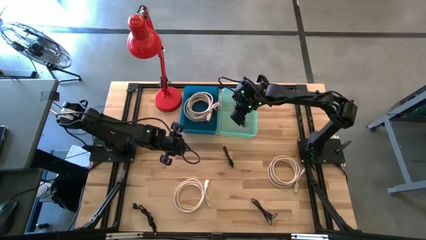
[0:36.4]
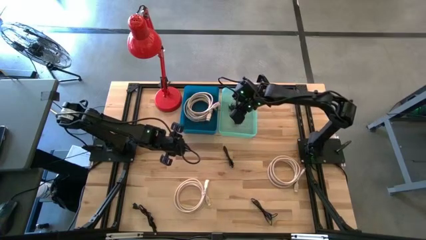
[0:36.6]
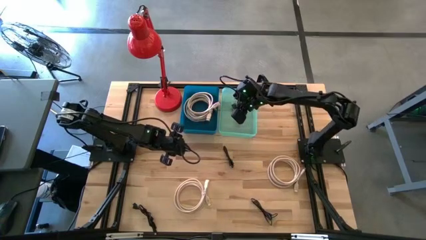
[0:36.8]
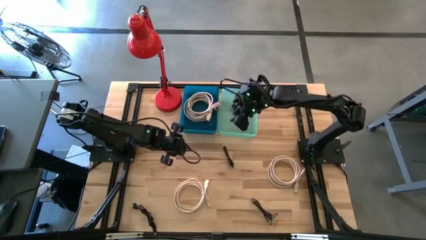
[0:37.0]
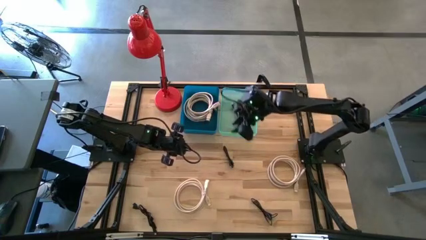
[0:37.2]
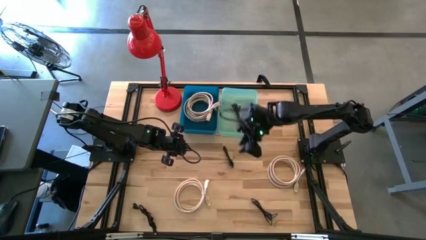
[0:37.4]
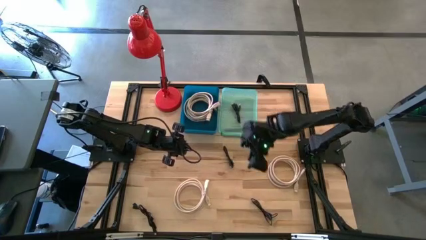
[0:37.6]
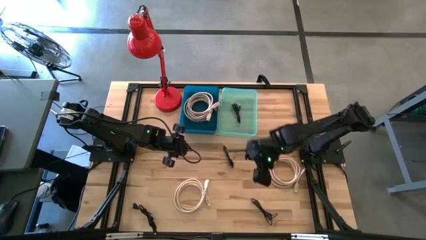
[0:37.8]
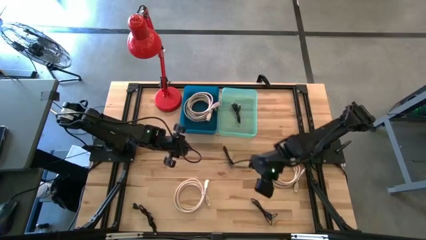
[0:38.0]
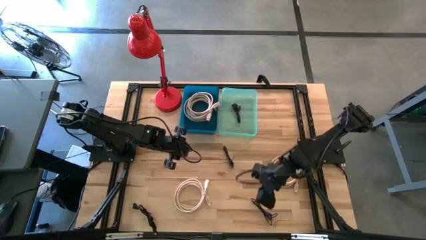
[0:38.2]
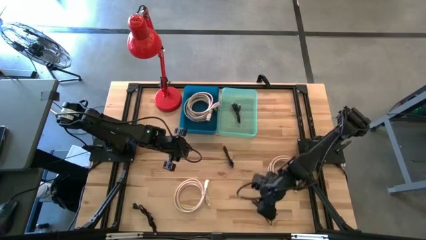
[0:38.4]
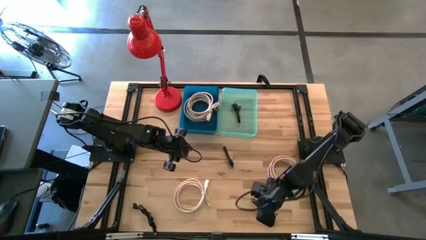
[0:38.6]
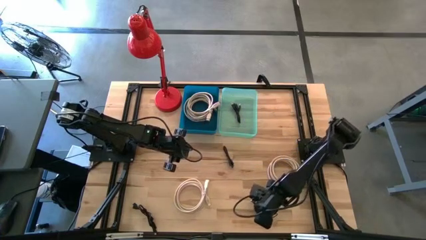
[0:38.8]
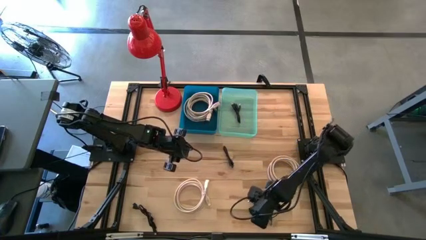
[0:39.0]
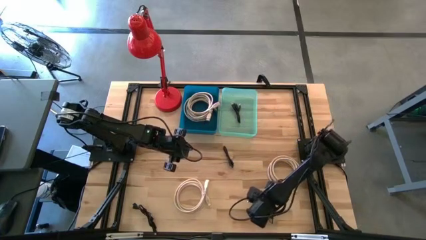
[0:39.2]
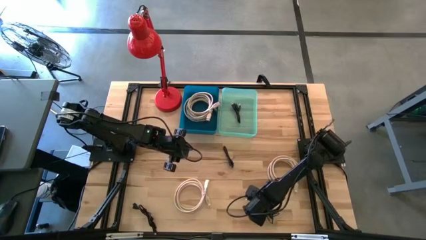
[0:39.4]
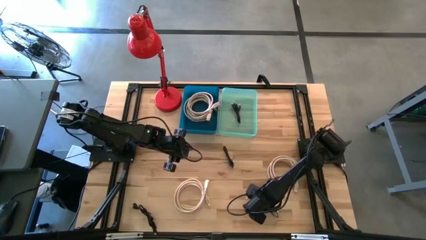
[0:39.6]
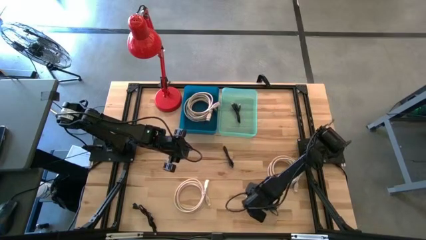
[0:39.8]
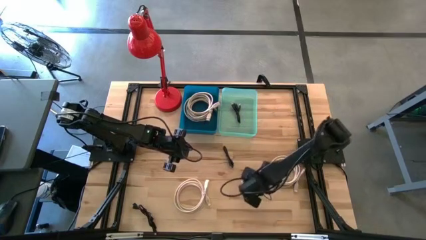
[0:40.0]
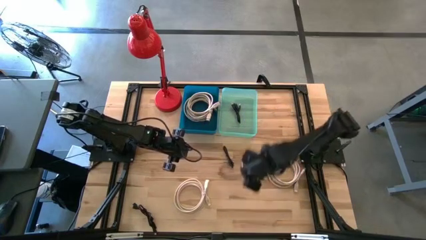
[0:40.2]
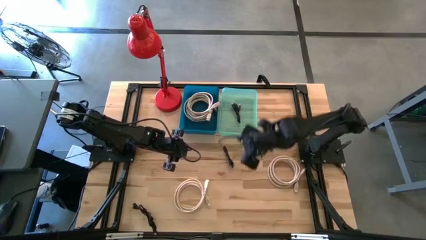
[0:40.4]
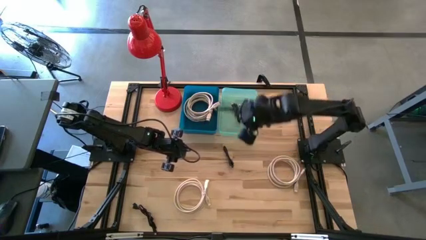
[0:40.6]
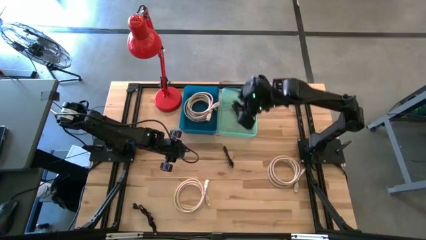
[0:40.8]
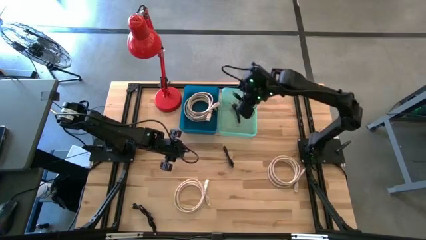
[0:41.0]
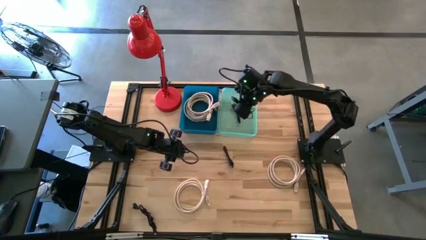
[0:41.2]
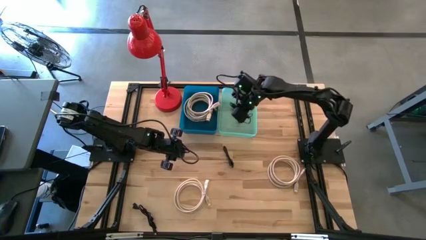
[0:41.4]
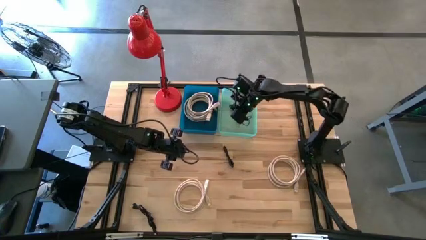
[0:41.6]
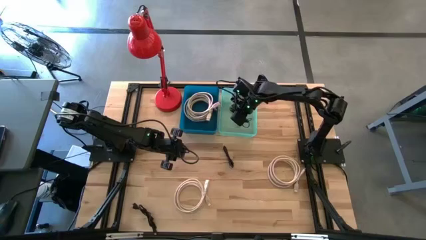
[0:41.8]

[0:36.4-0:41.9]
Task: Pick & Place USB Port
Put the black USB cable into the green bin

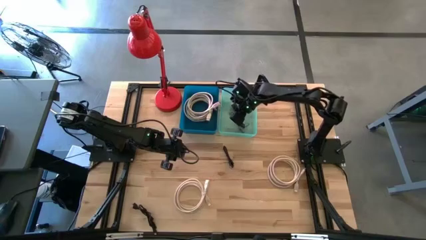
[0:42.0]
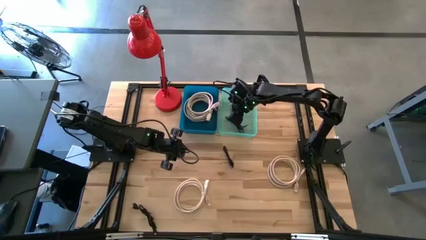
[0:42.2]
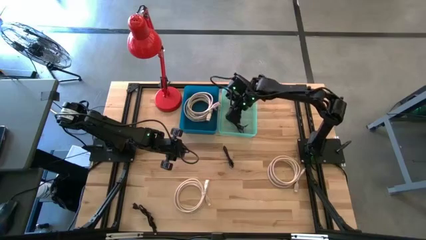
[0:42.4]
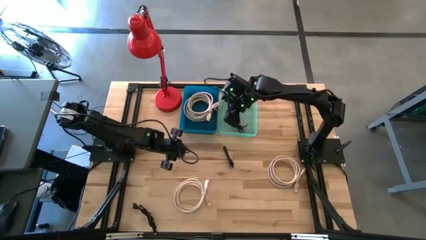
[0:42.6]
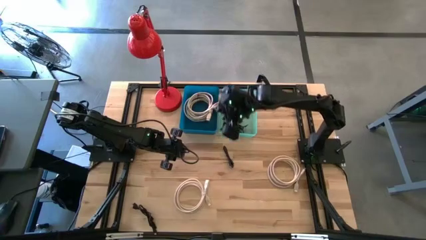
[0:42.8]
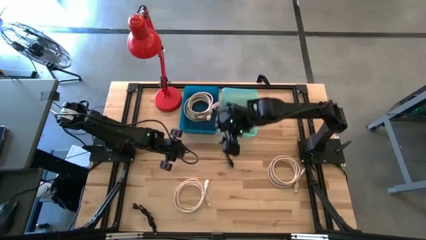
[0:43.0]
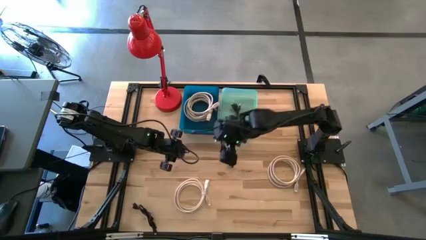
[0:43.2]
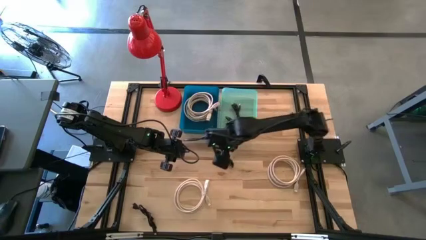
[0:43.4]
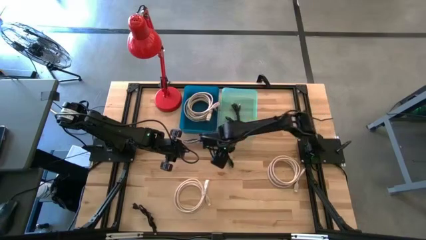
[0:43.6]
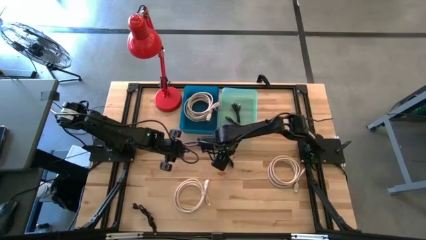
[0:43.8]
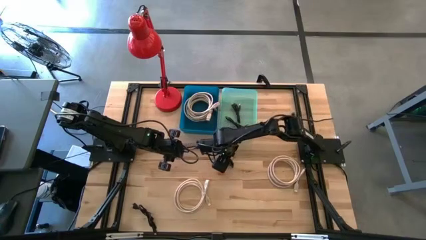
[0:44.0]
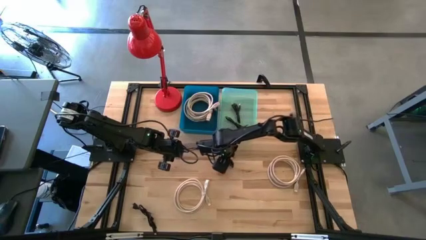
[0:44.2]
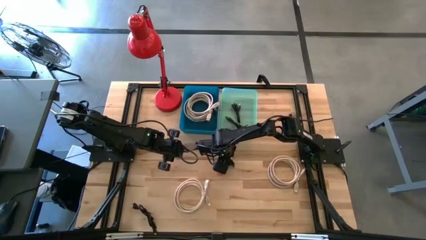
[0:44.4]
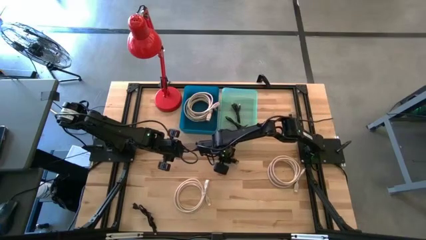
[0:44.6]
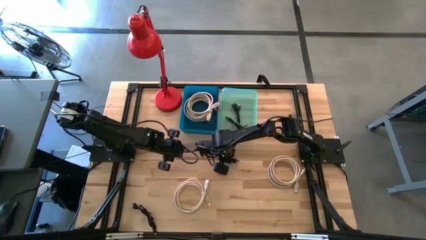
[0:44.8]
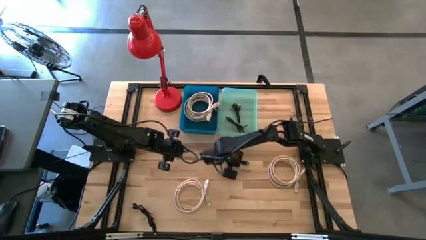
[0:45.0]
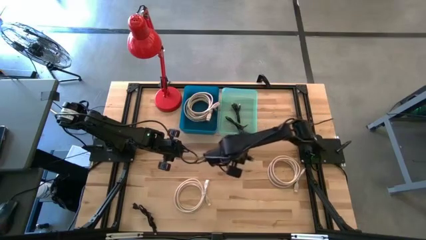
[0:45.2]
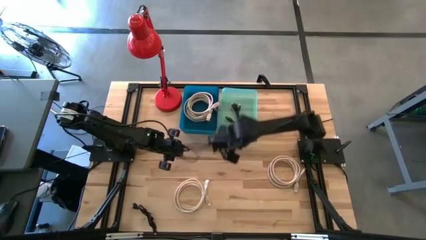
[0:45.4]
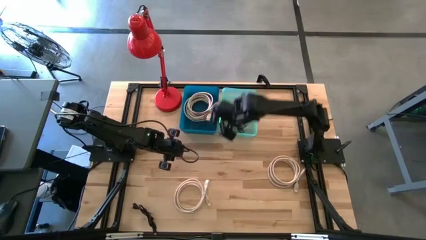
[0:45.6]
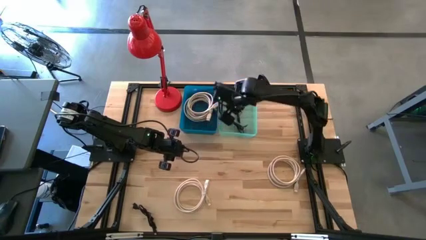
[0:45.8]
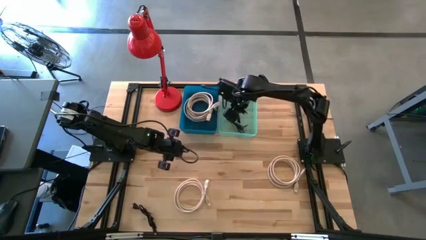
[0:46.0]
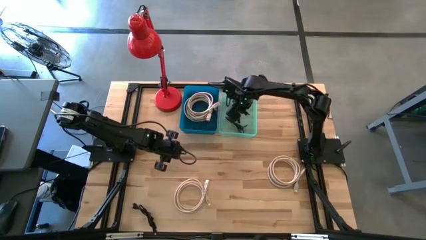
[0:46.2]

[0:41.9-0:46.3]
Put the black USB cable into the green bin

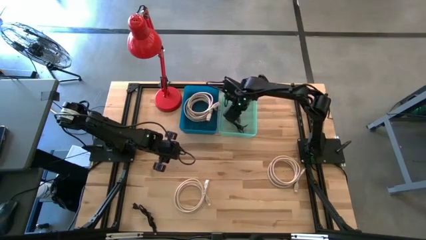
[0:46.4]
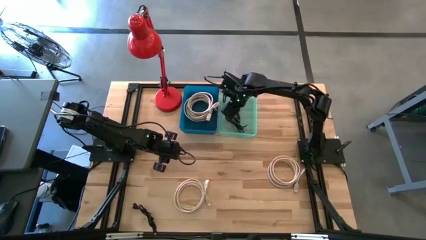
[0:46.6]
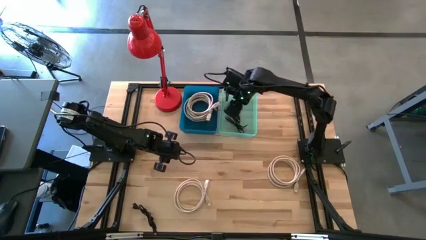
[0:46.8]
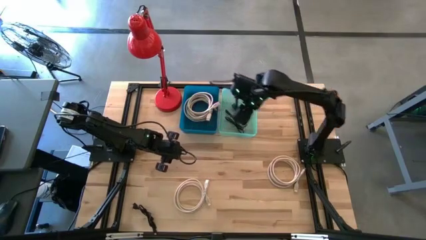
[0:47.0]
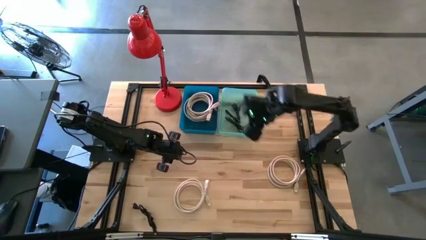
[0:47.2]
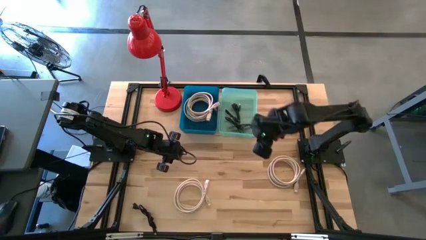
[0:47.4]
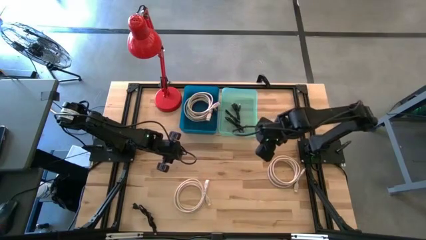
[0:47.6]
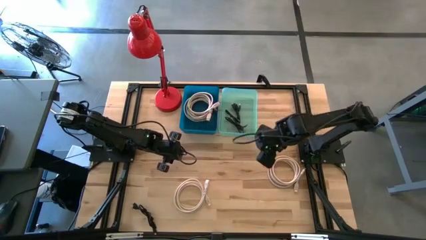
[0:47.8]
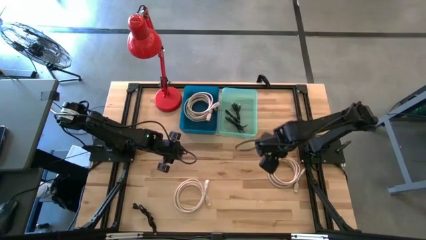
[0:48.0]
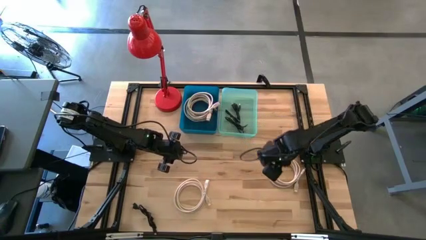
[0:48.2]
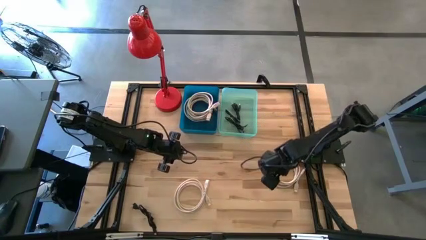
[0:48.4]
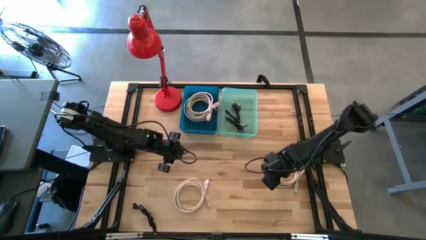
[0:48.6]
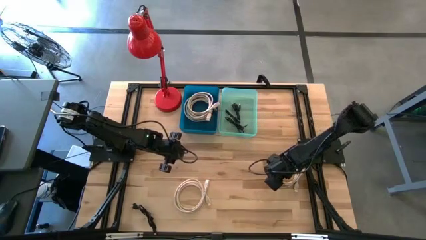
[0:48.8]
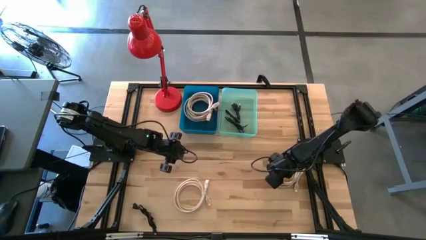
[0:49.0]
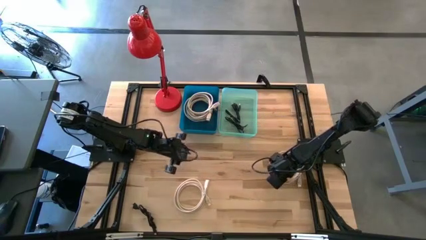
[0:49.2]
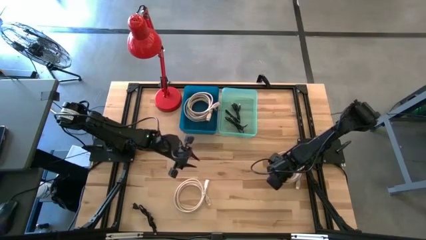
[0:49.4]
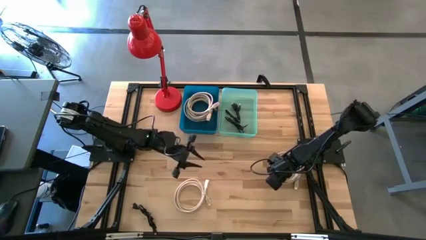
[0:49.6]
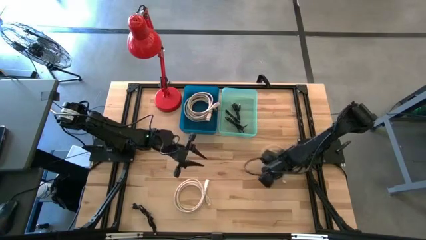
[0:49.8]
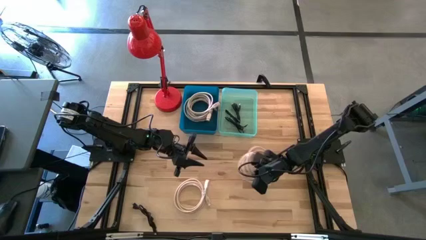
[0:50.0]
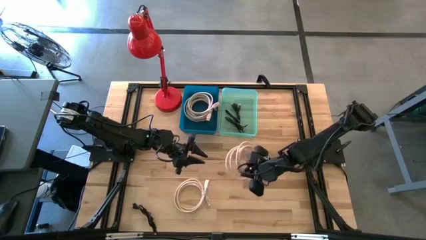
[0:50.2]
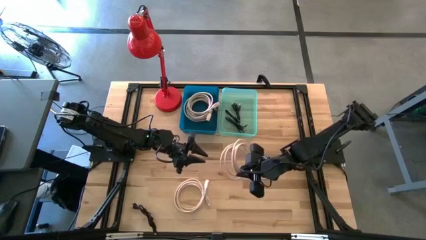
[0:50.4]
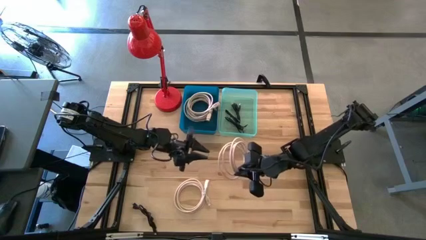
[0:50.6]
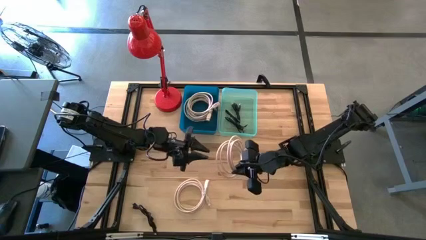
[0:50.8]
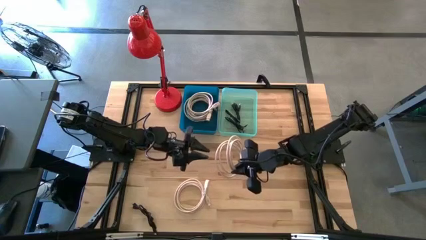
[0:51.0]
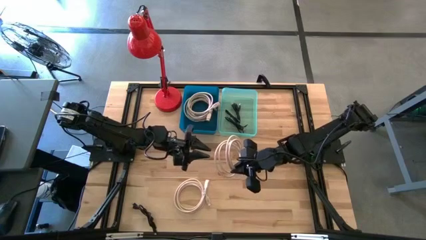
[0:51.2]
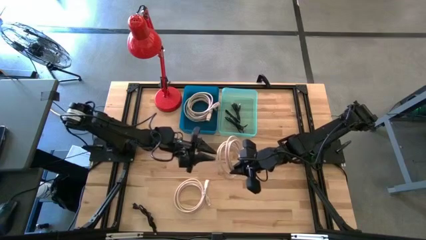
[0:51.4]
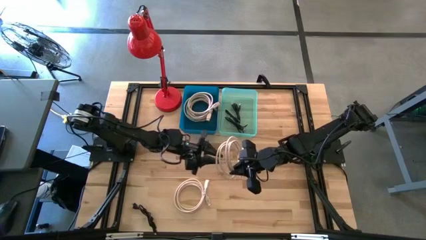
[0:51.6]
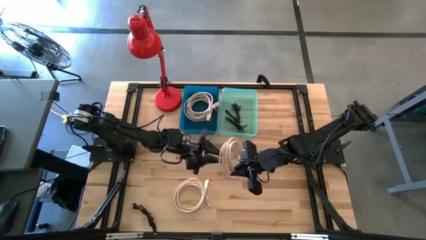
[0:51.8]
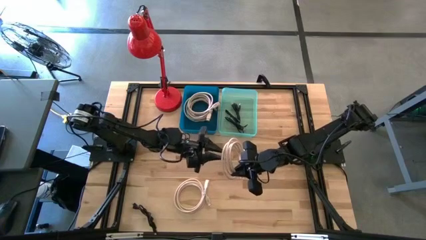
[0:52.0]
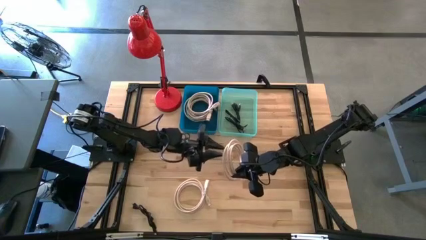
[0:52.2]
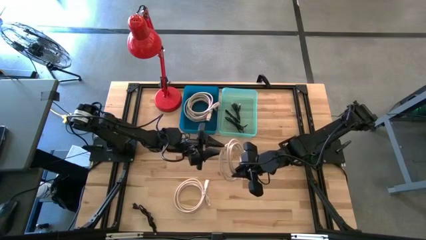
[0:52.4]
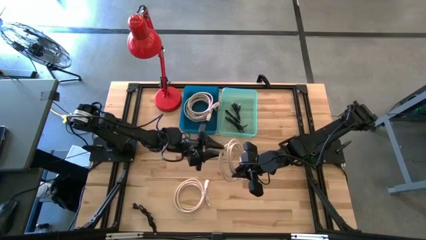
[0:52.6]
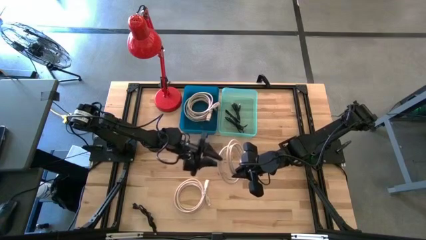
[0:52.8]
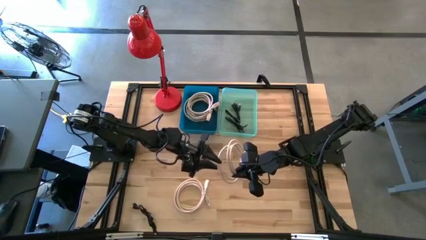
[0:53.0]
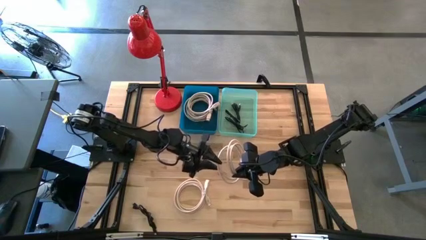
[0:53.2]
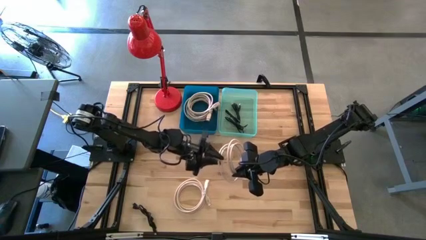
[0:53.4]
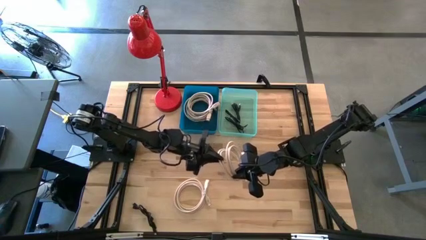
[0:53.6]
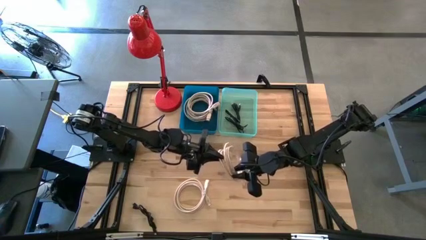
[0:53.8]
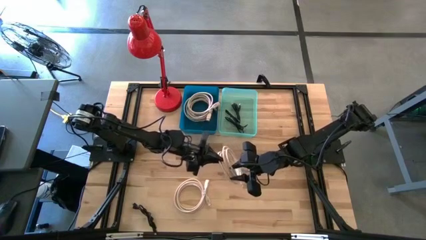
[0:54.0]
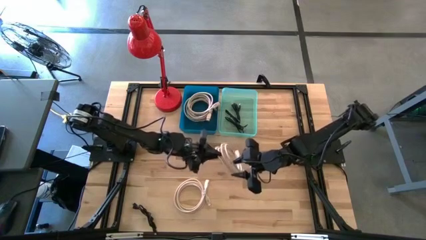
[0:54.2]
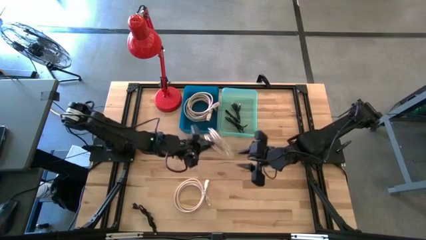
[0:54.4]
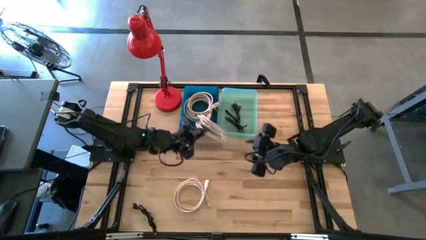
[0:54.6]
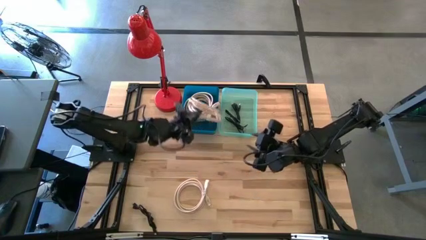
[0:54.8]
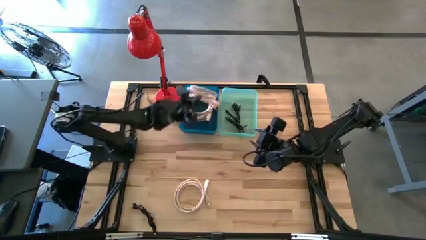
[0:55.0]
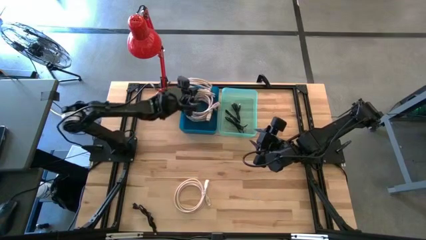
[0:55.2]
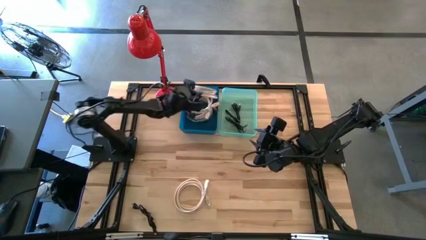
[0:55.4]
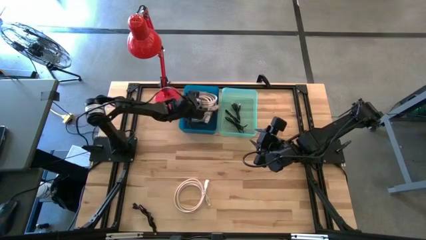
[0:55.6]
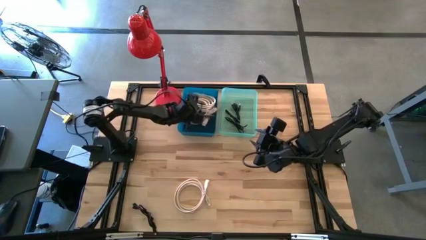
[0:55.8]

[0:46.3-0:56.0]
Put the white HDMI cable into the blue bin
